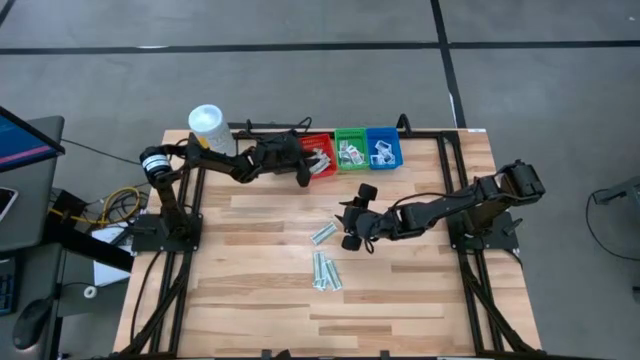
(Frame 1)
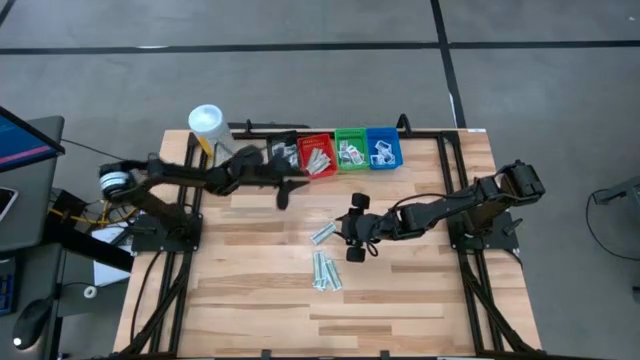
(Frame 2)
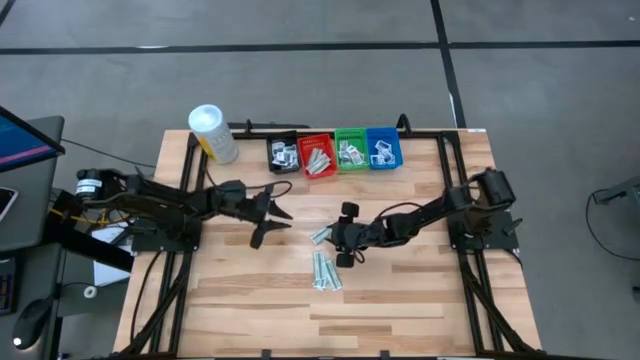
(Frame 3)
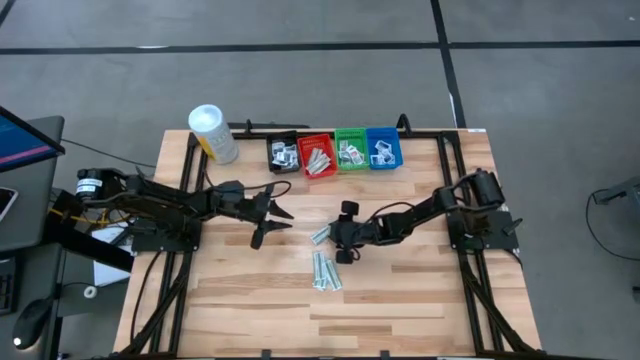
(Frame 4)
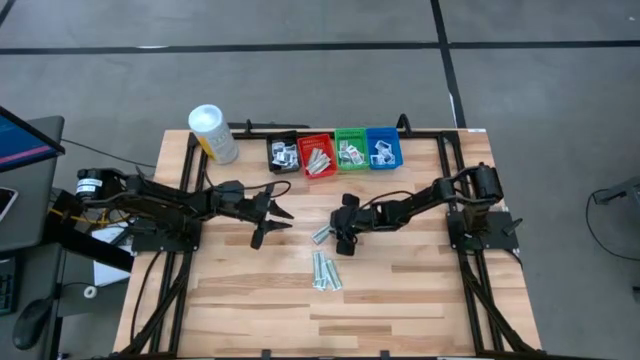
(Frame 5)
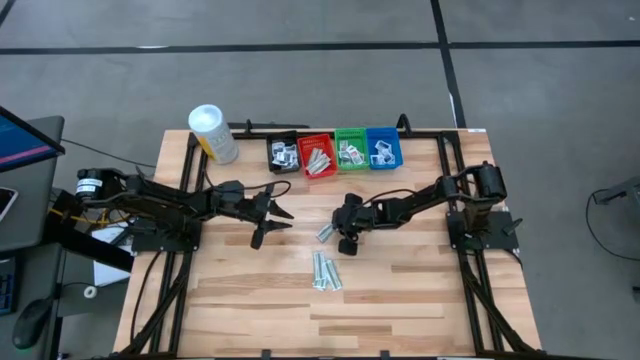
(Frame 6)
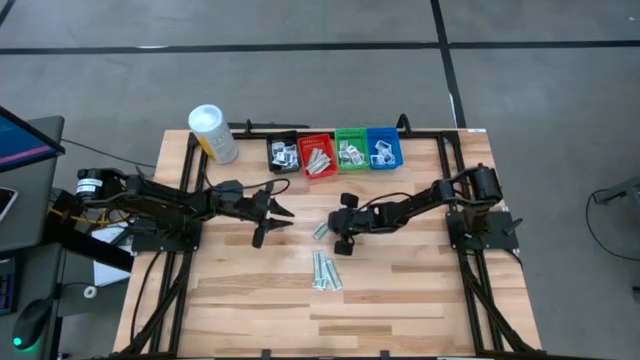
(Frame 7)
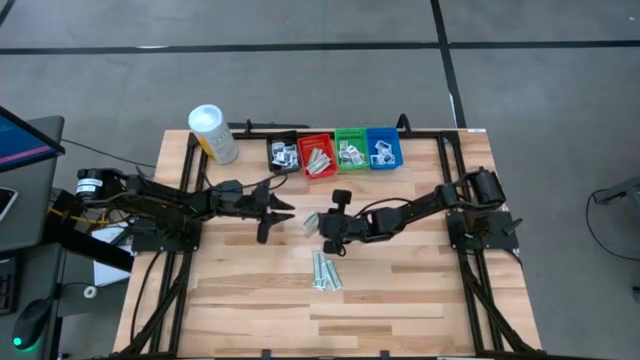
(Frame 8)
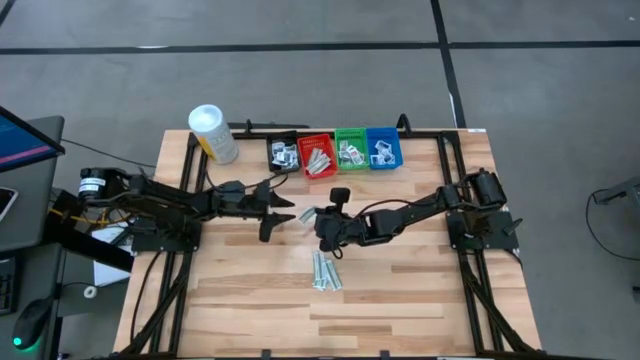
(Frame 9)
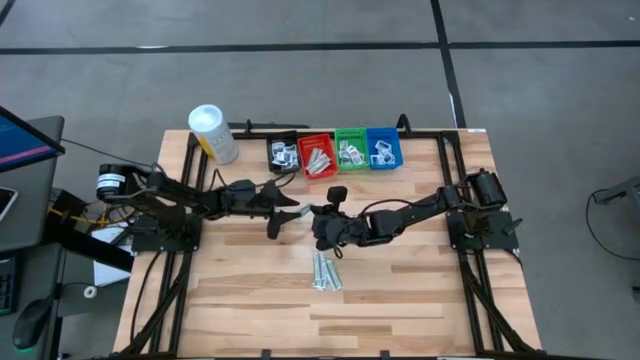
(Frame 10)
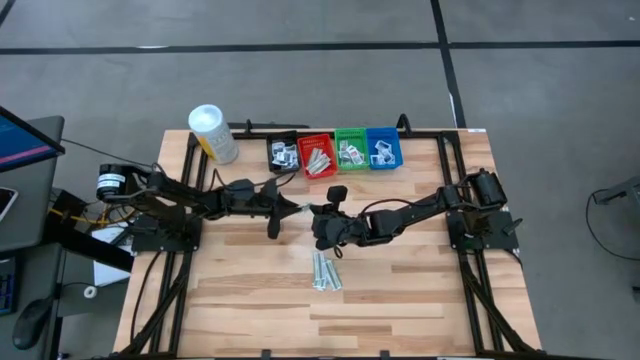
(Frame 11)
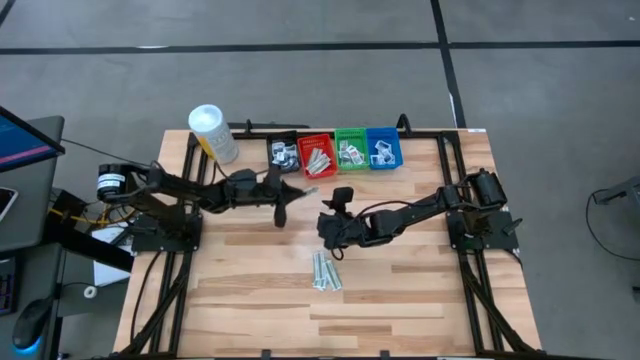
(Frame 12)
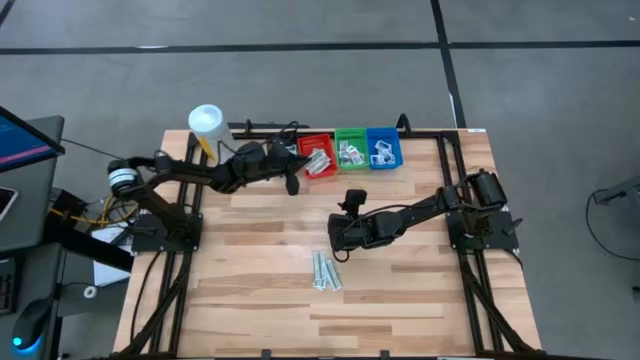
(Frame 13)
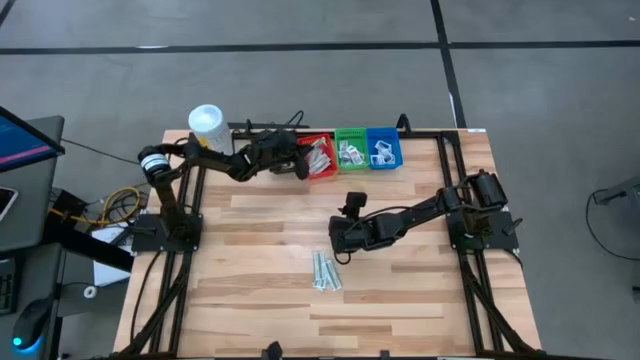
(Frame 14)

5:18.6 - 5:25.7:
Task: Pick & Place First Aid Supplies
Put the green bandage pack into the red bin

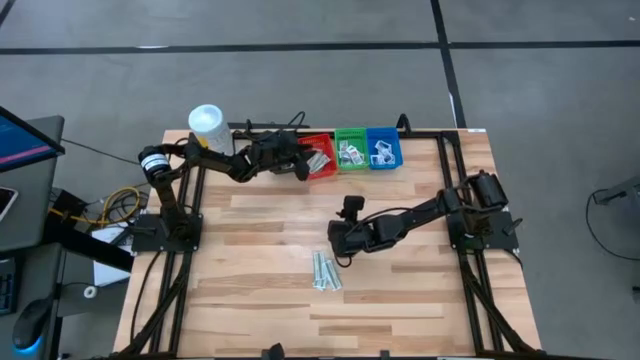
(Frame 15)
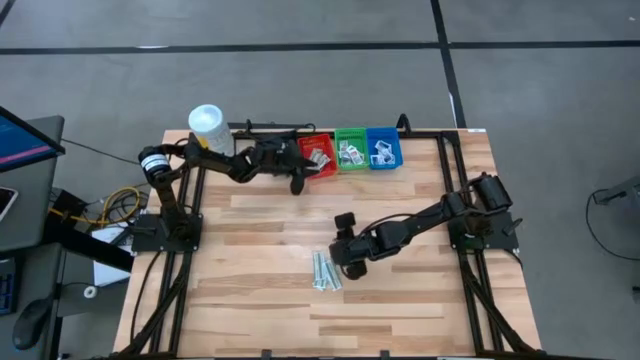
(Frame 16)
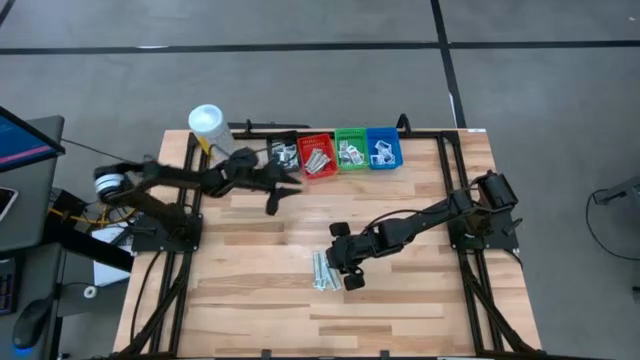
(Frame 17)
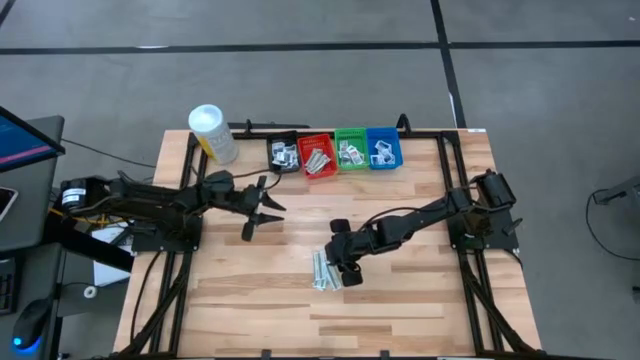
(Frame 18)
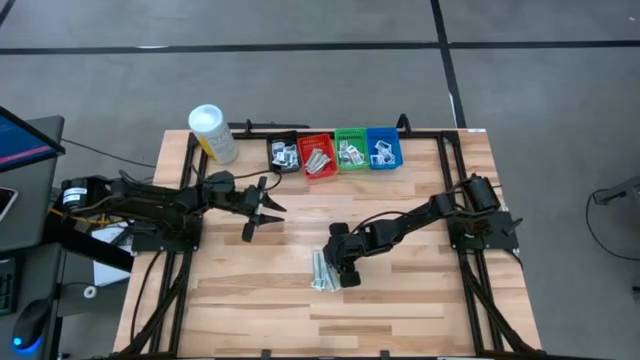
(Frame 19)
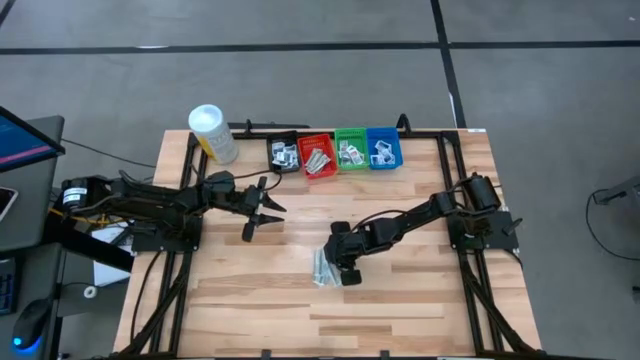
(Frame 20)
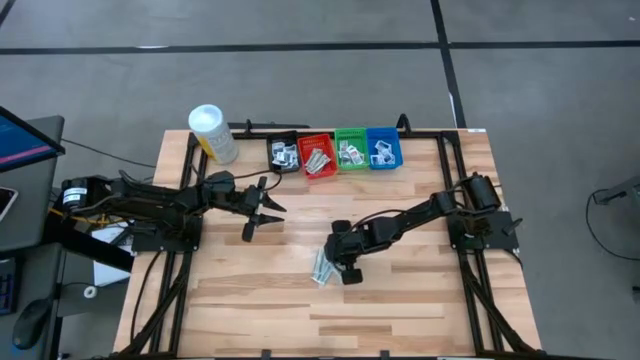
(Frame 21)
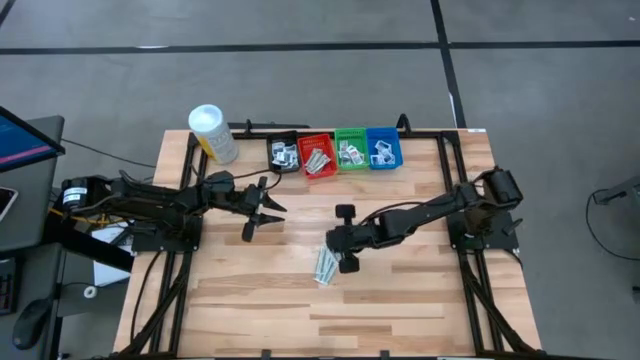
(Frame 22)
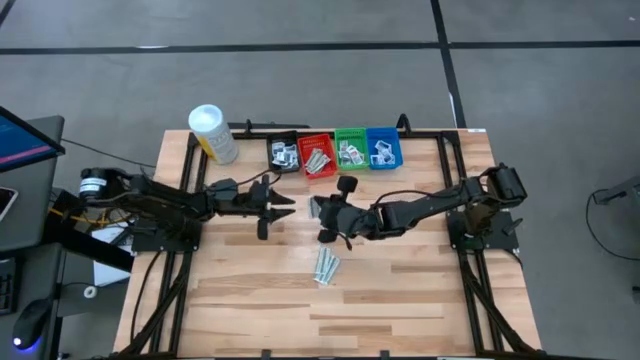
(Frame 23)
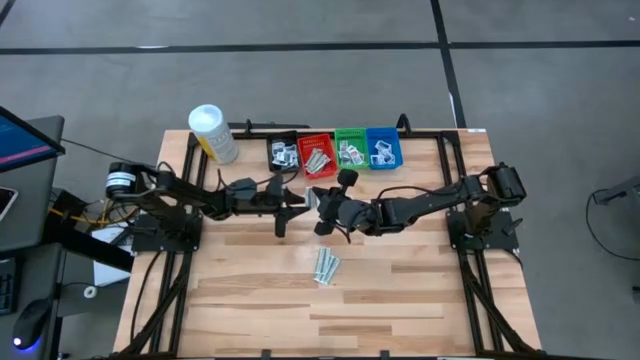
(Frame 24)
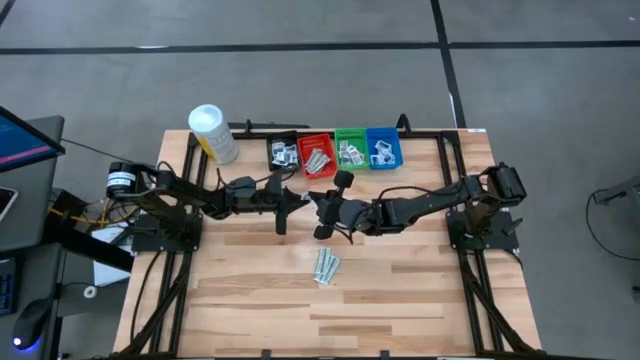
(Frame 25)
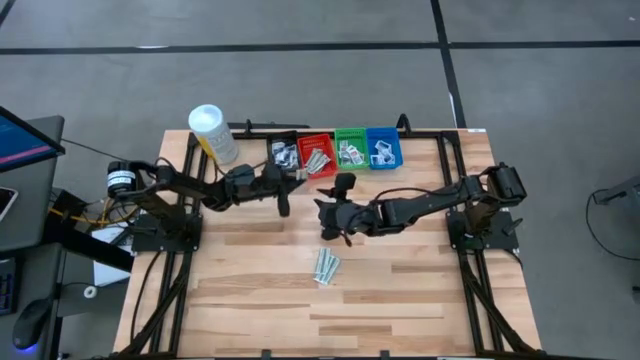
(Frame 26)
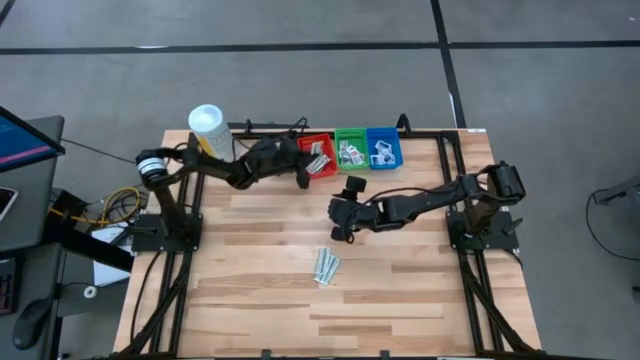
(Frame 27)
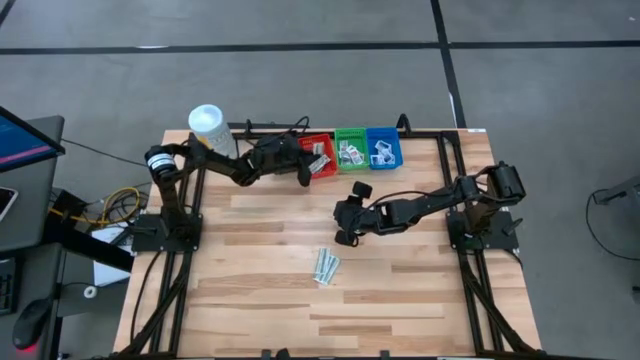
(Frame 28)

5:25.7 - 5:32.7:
Put the green bandage pack into the red bin

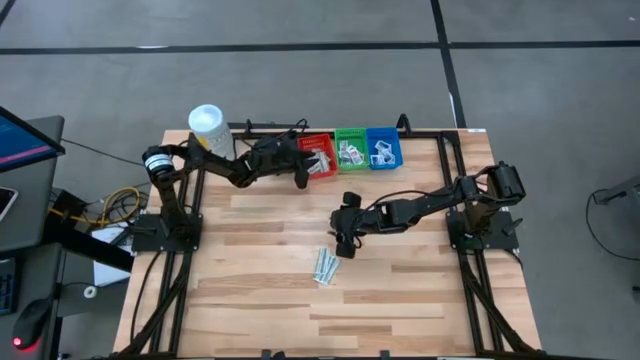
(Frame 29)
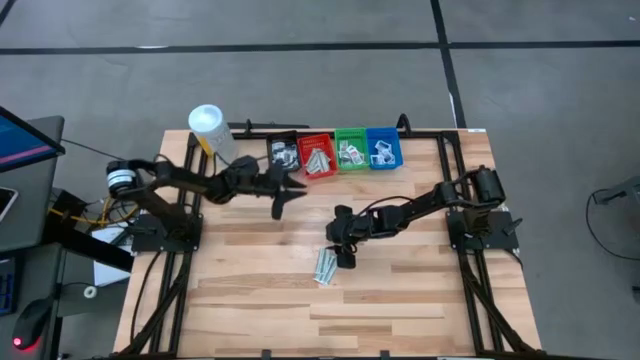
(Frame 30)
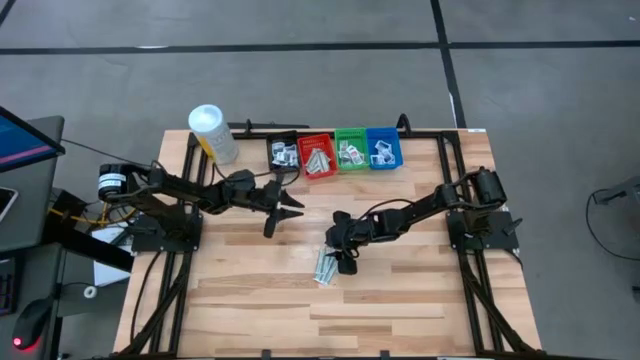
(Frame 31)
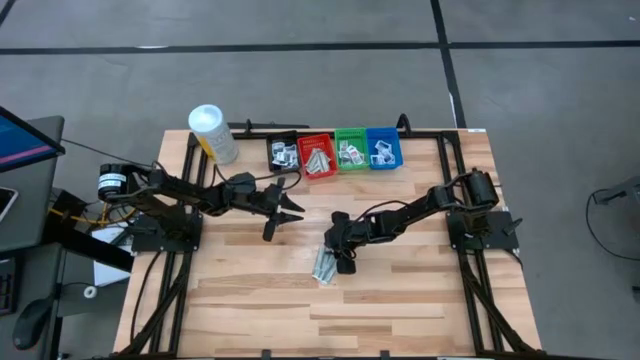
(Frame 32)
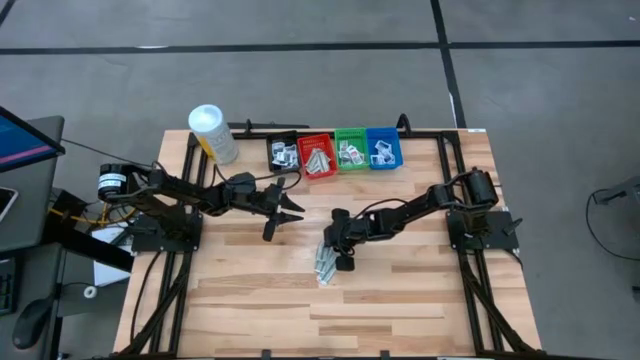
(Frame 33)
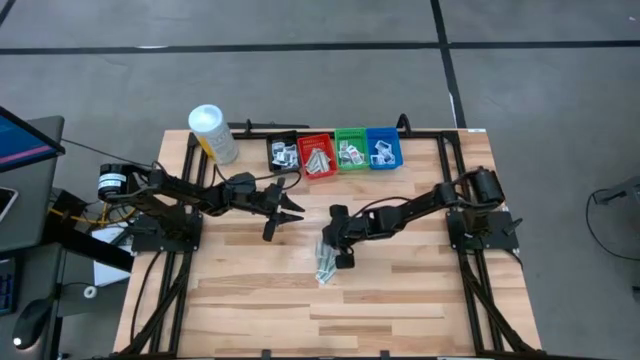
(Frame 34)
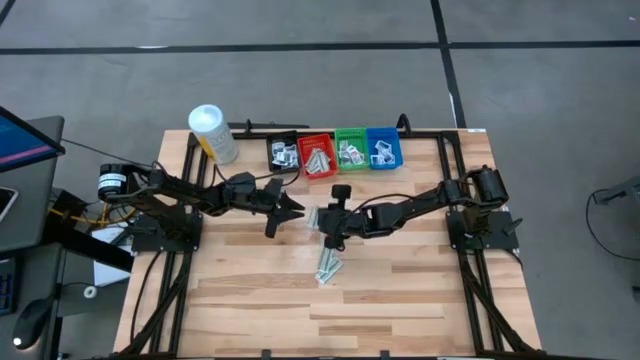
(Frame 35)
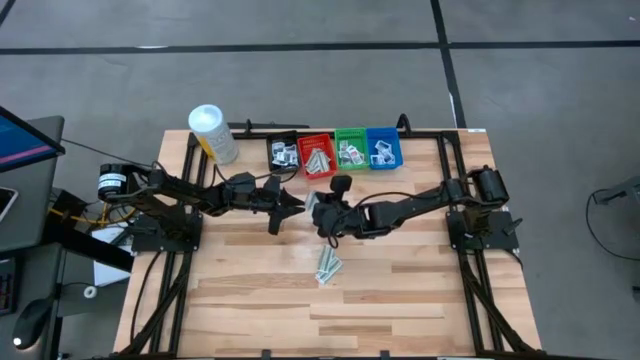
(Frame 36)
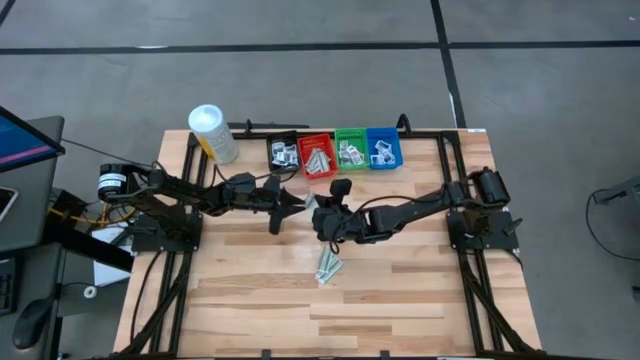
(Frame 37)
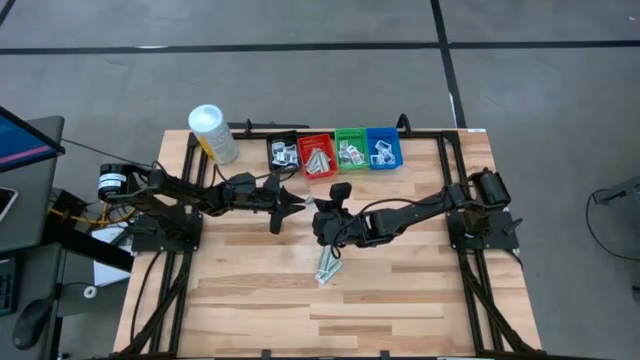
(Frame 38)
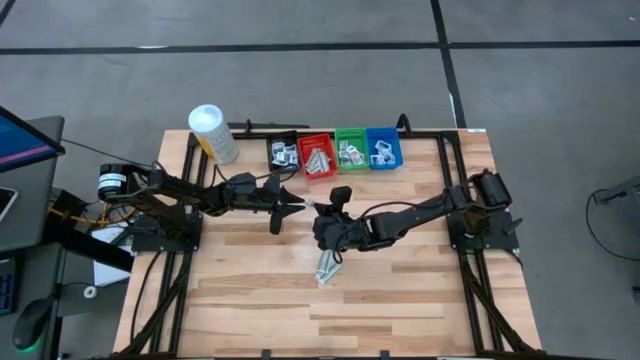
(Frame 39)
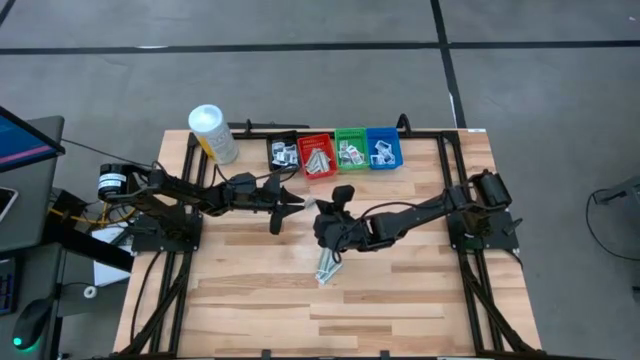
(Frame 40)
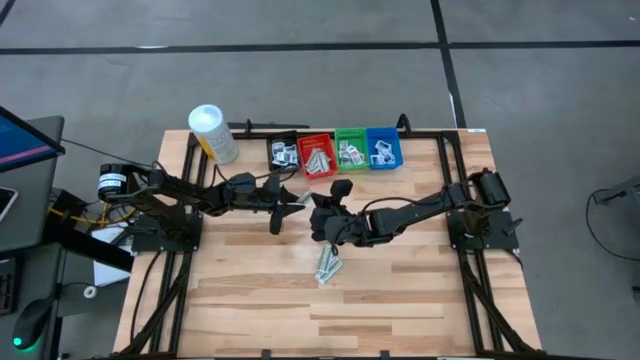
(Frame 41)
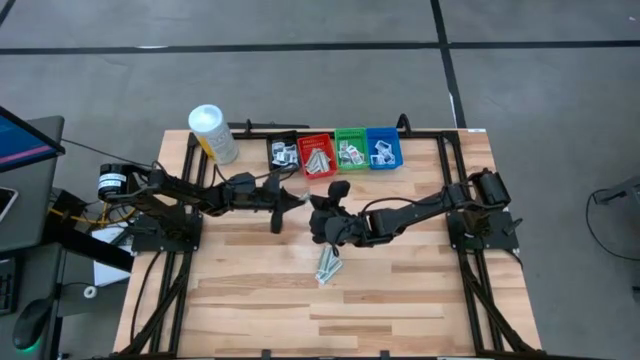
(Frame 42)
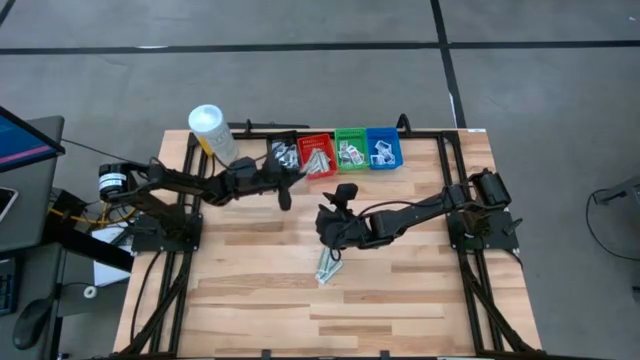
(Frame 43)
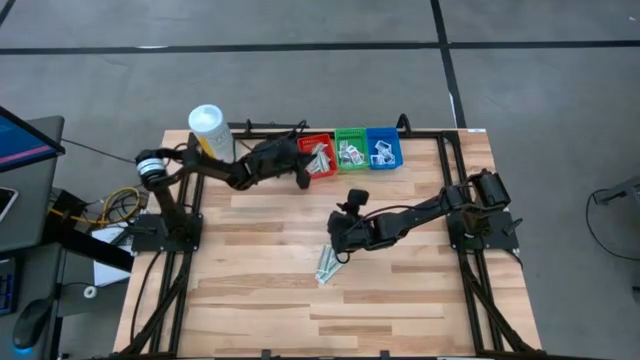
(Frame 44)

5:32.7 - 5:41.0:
Put the green bandage pack into the red bin
